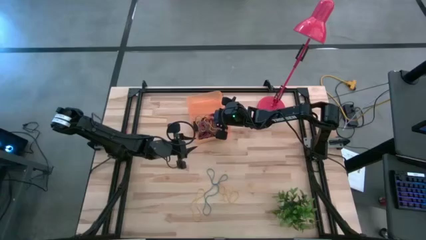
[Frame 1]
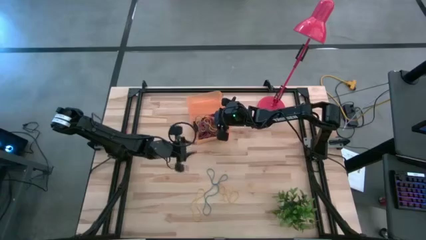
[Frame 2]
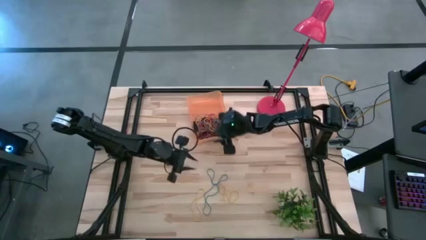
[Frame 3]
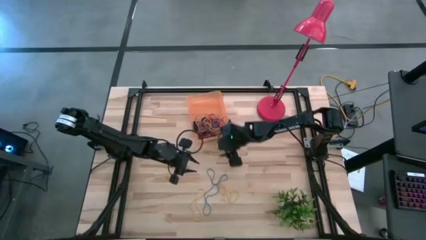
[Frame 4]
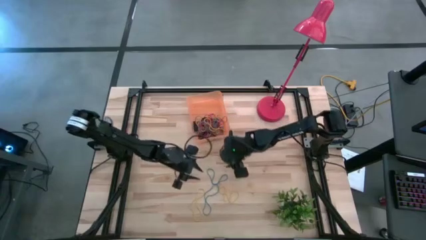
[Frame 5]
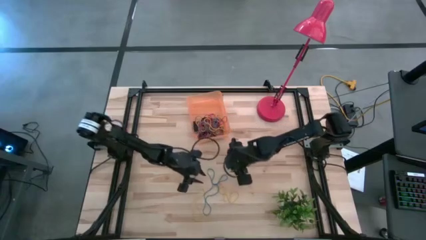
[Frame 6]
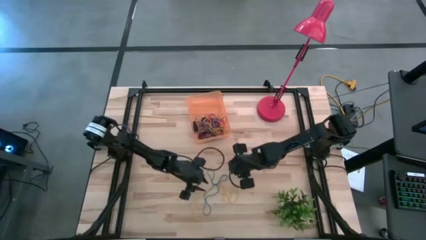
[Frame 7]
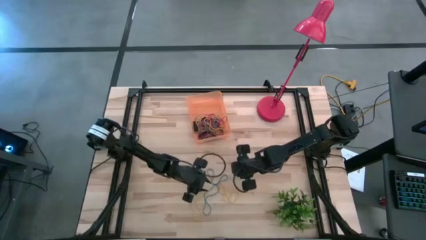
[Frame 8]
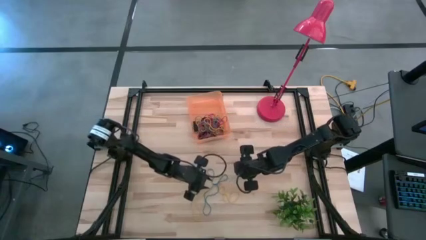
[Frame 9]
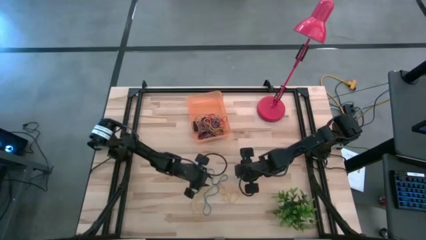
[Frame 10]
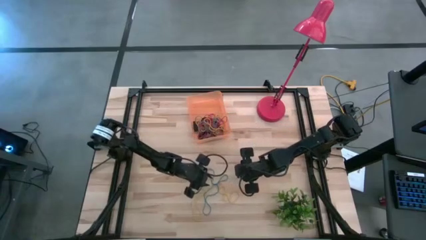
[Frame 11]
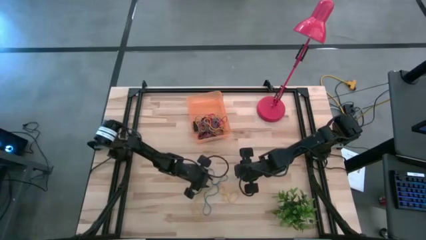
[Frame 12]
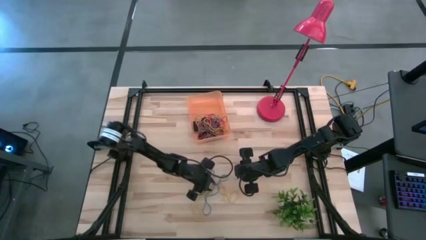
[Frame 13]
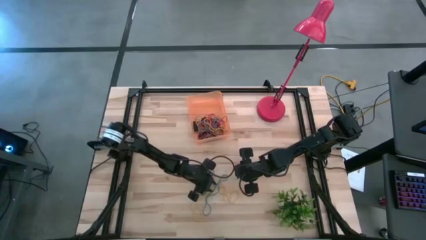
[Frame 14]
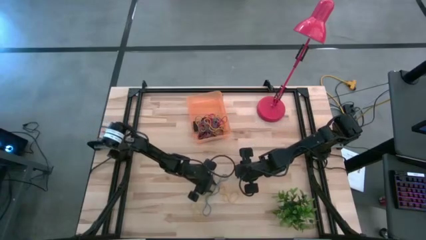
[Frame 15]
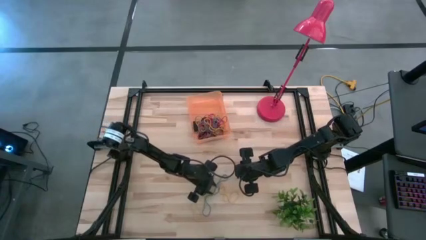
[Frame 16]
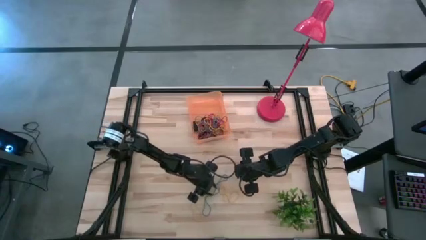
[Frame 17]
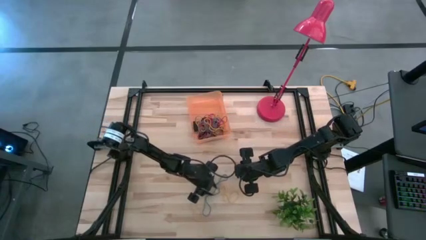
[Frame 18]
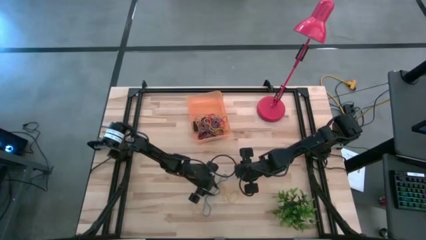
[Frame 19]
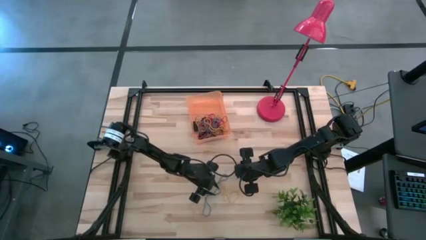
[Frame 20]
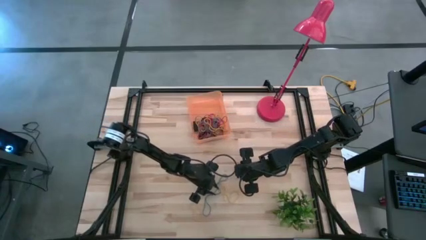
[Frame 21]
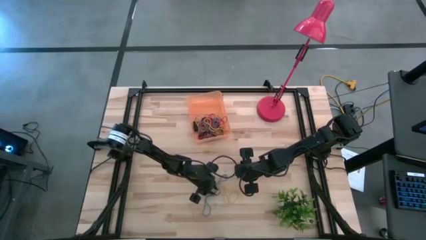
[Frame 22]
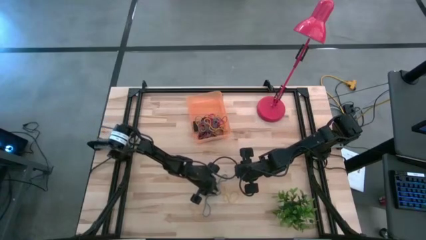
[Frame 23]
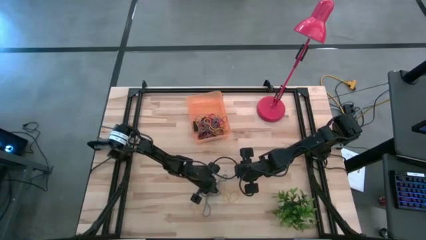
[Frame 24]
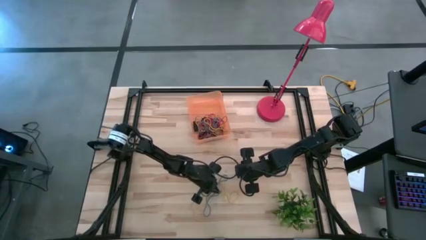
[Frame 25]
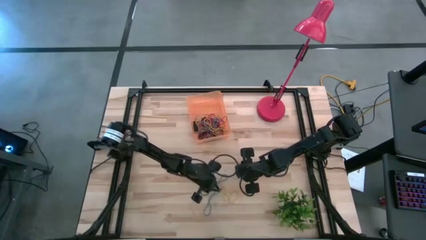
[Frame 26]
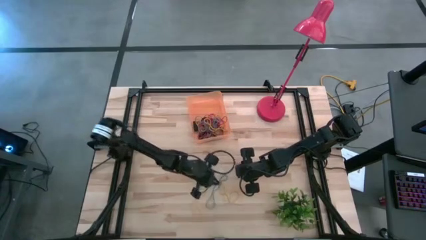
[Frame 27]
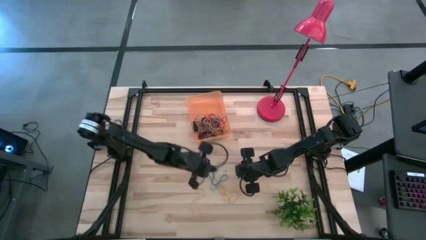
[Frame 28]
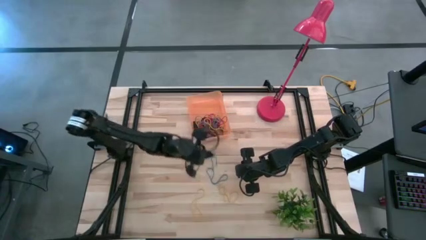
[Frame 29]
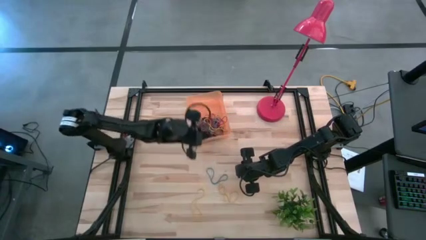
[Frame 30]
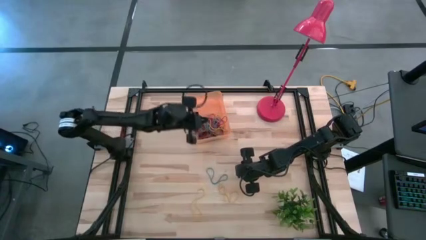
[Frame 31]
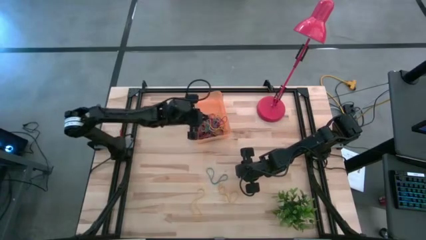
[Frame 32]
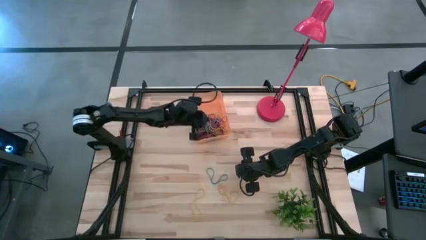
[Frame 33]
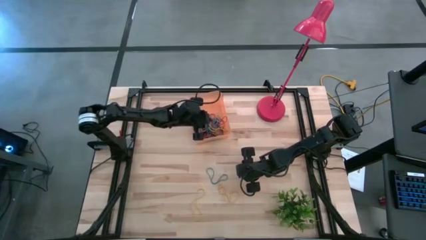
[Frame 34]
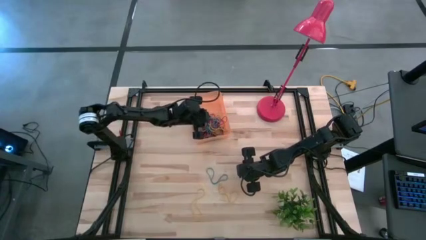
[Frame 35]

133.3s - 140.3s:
Task: Pick and place rubber bands into bin
Put the blue rubber band into the orange bin

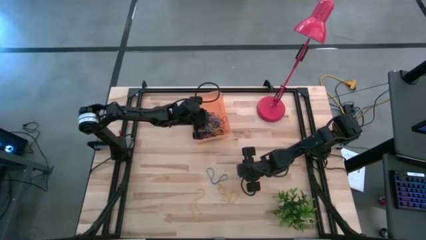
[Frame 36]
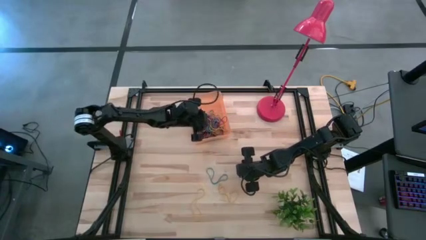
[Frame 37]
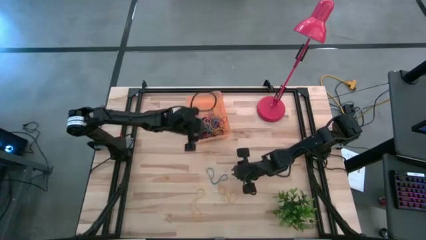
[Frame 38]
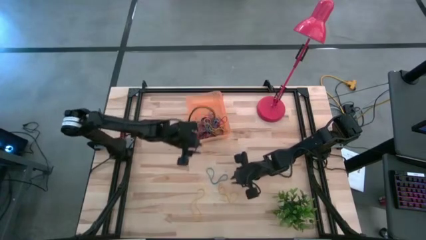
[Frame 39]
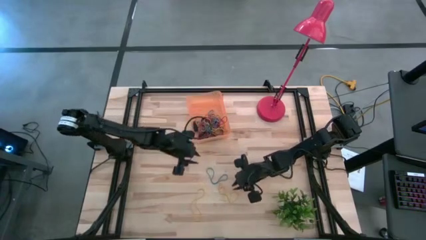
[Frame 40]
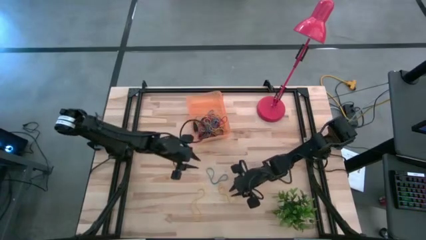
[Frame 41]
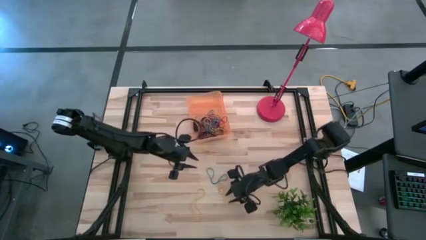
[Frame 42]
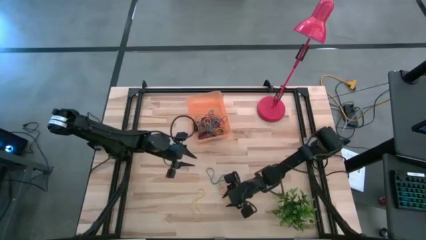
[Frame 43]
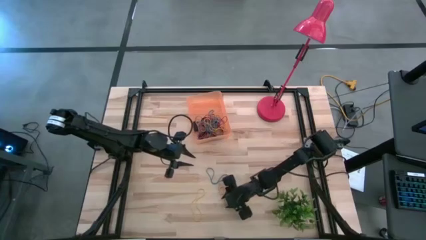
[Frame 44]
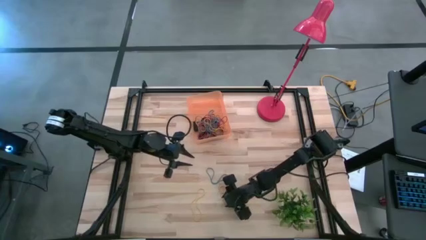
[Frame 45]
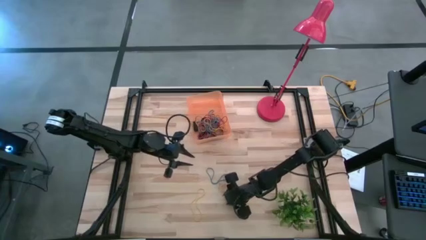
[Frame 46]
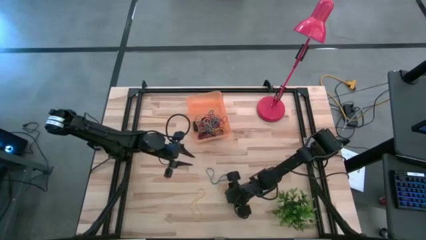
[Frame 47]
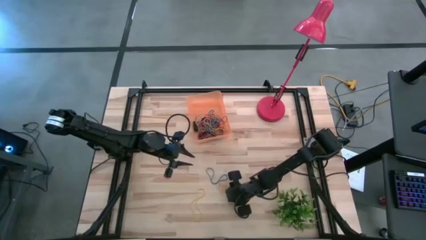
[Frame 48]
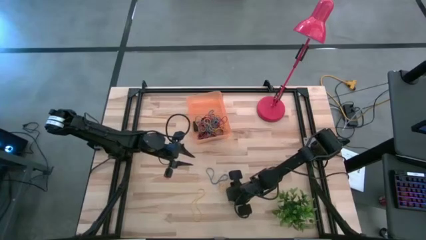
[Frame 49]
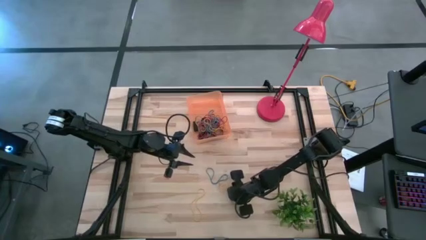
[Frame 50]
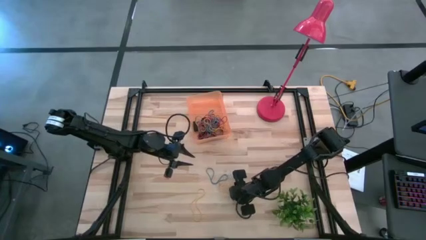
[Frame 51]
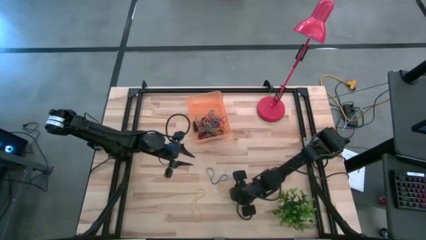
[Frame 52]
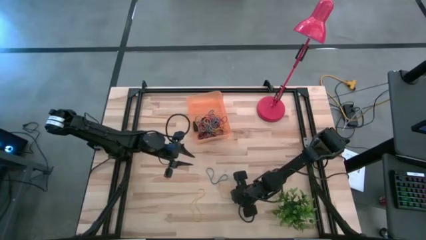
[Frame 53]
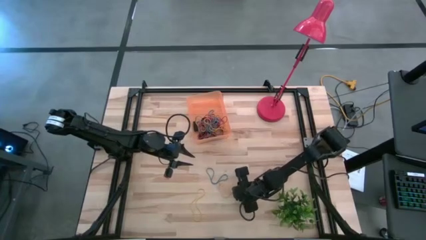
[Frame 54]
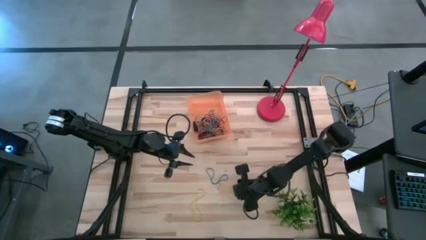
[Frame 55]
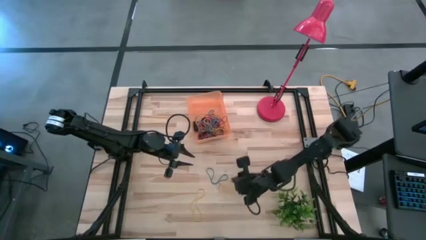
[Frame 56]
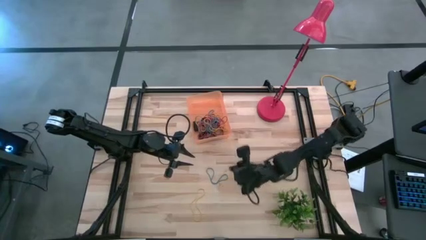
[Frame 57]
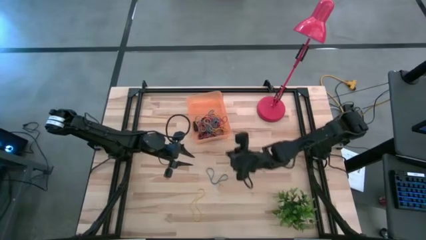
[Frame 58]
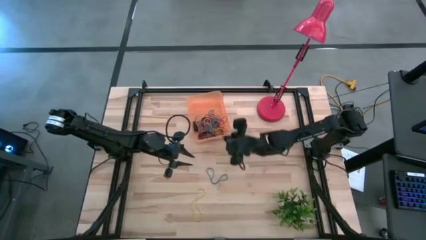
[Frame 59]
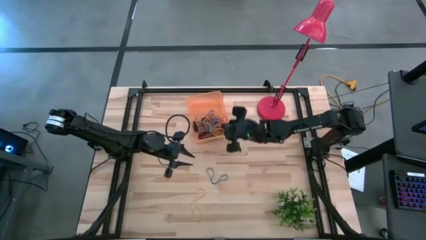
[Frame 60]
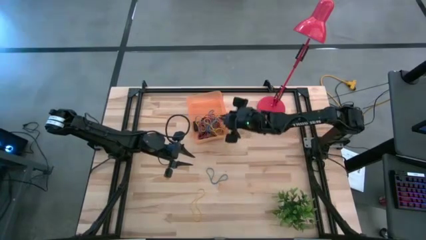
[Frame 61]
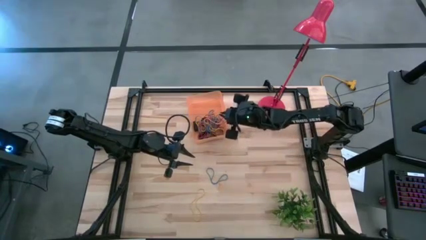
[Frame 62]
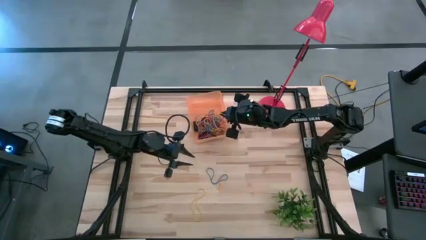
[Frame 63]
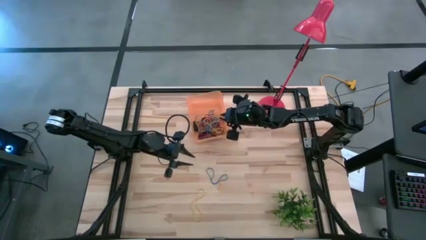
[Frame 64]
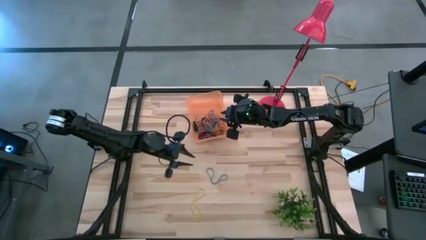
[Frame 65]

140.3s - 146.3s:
Put the yellow rubber band into the orange bin

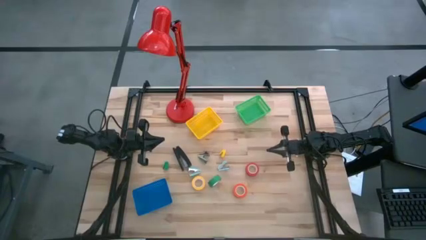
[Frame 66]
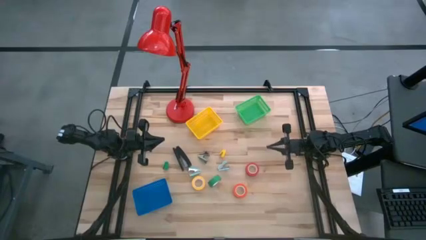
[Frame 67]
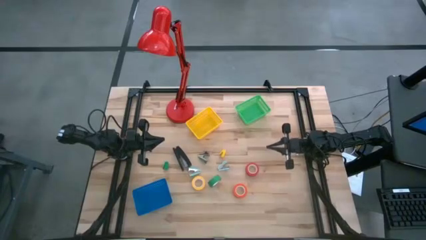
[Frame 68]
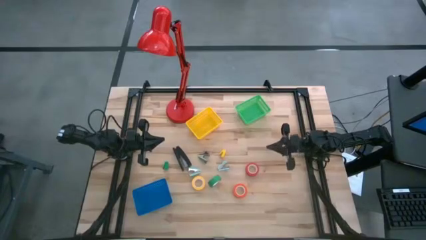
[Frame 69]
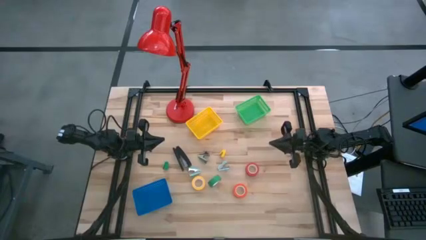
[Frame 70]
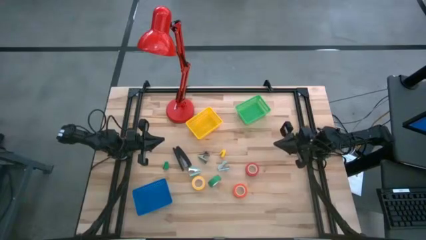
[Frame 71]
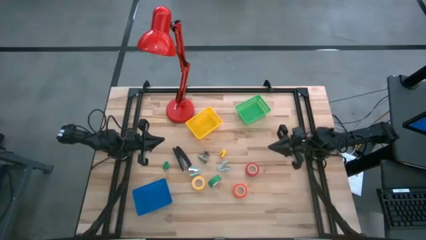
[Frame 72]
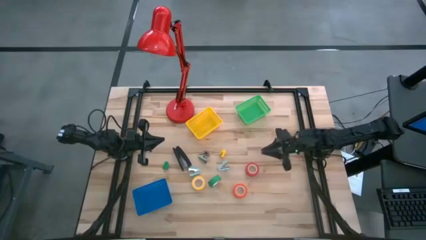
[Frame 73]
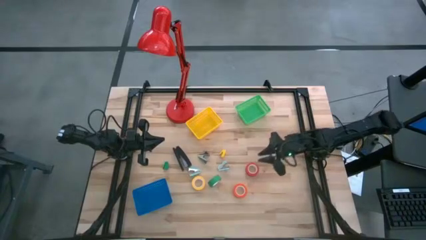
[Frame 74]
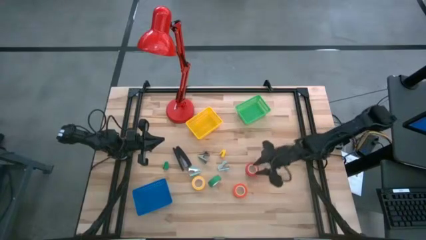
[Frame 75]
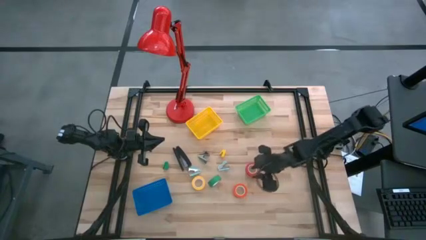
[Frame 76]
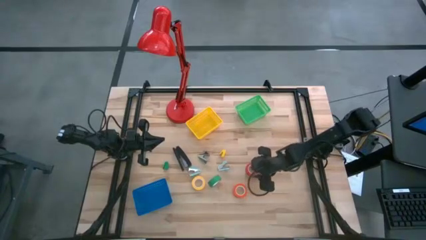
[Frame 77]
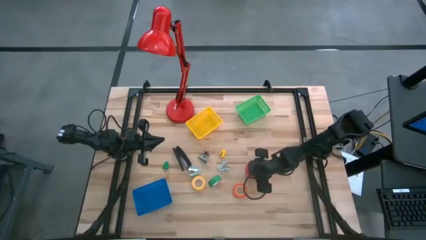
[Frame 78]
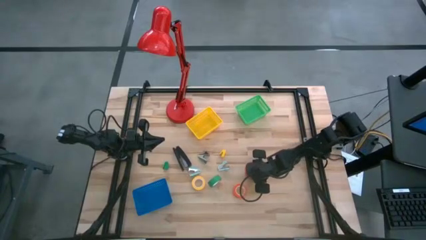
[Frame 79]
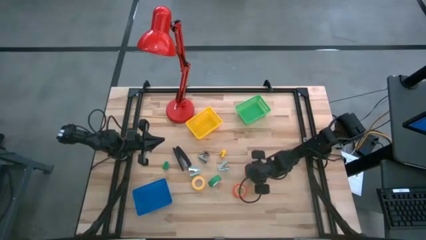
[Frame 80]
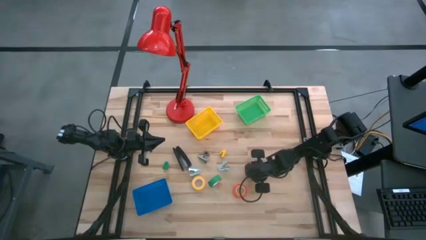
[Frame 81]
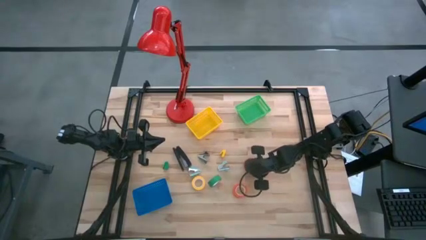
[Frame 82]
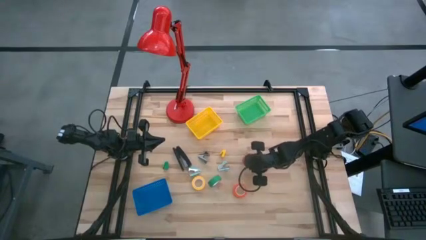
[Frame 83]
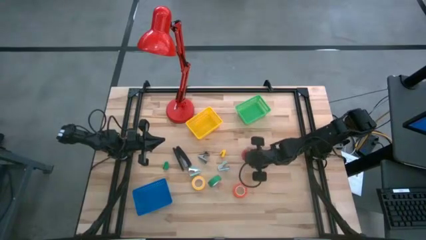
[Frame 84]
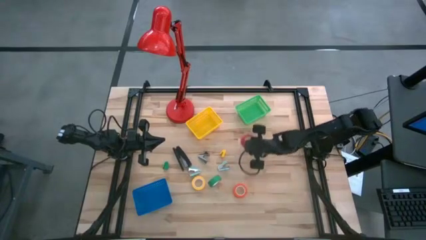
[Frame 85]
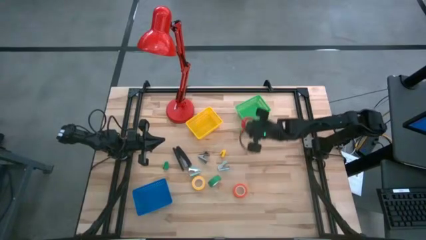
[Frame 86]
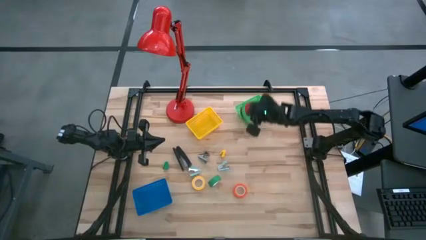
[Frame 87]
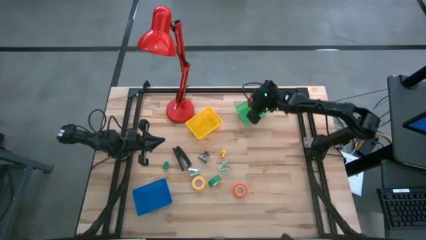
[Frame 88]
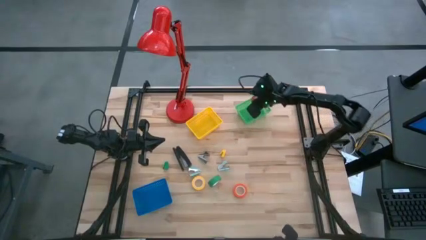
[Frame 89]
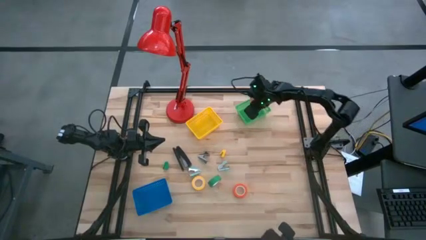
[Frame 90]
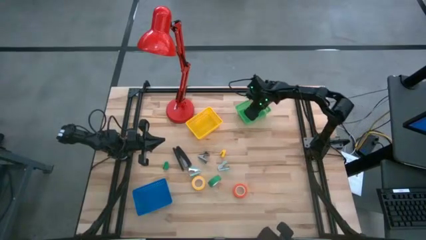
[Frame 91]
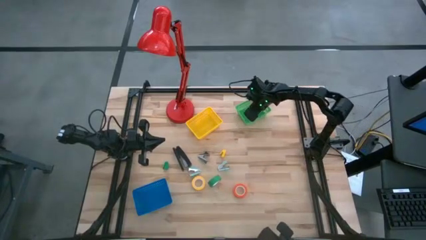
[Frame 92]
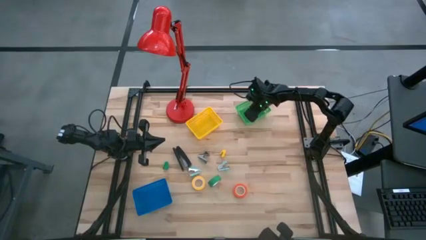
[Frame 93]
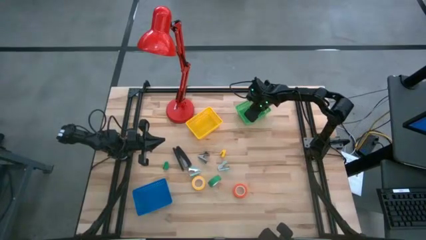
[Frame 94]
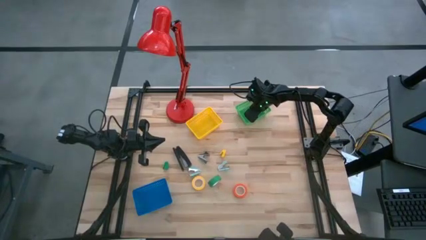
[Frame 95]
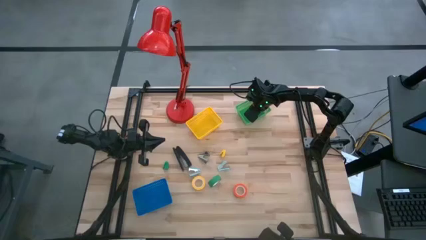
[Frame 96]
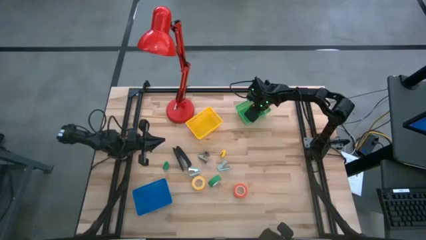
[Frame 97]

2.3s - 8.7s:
Task: Pick and place Stapler, Stapler remover, tape
Put the red tape into the green bin
